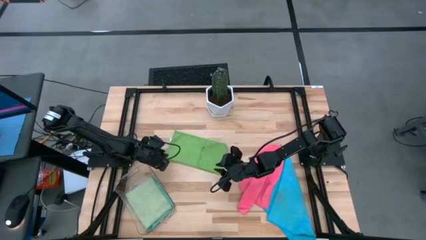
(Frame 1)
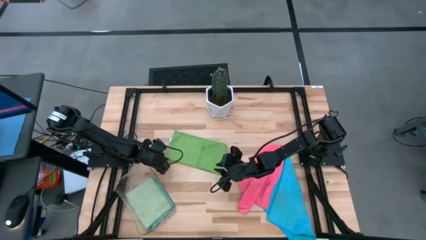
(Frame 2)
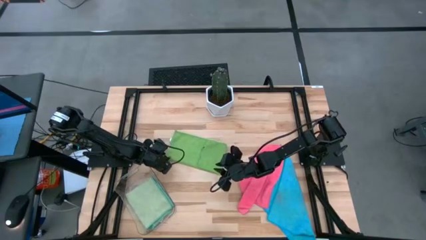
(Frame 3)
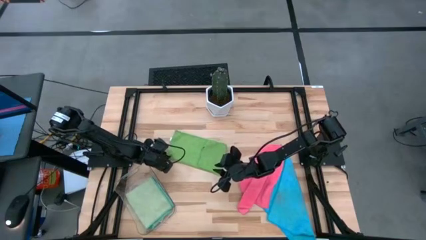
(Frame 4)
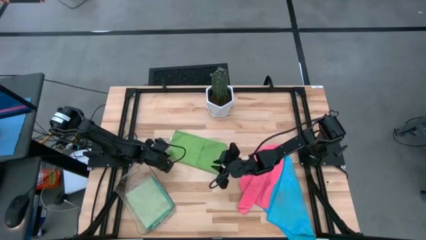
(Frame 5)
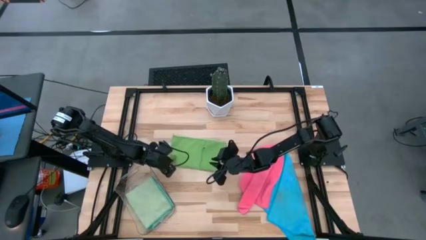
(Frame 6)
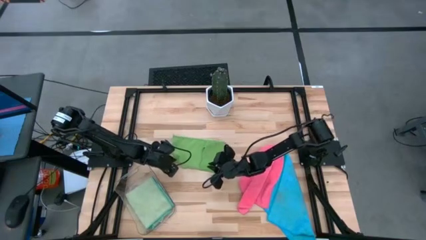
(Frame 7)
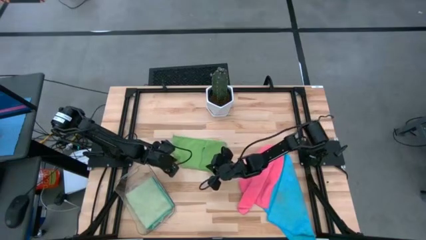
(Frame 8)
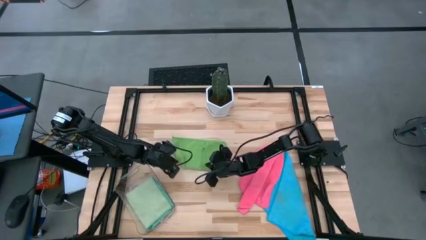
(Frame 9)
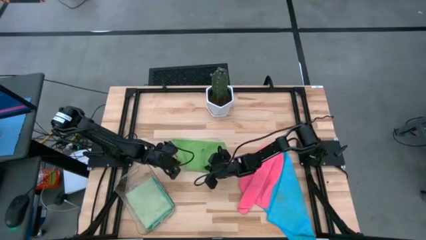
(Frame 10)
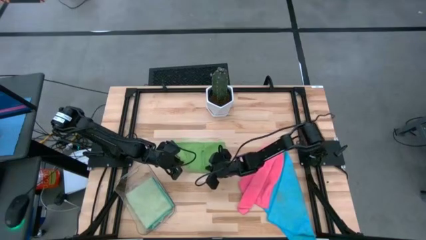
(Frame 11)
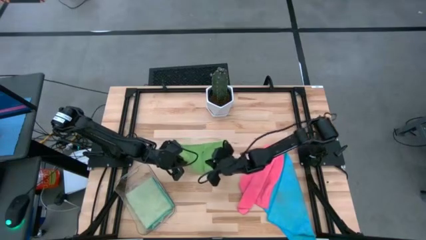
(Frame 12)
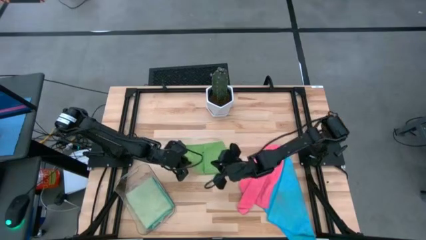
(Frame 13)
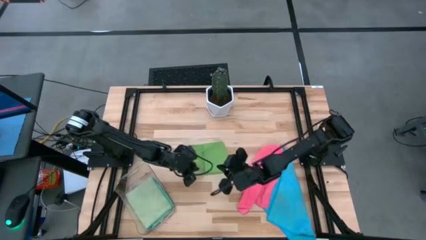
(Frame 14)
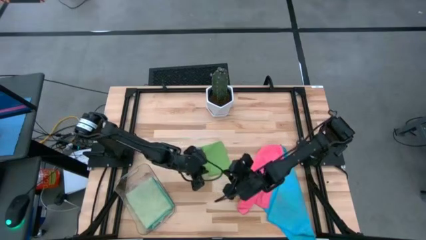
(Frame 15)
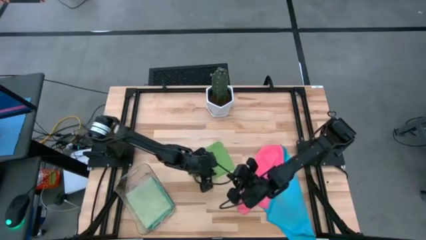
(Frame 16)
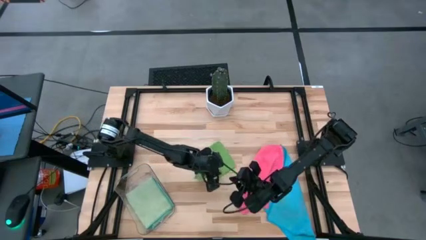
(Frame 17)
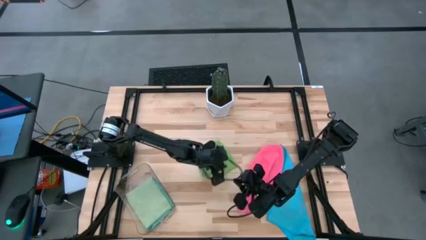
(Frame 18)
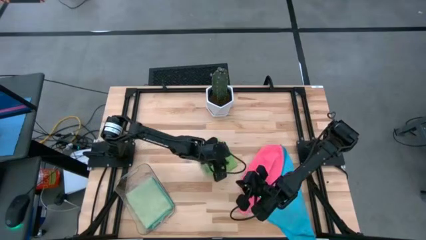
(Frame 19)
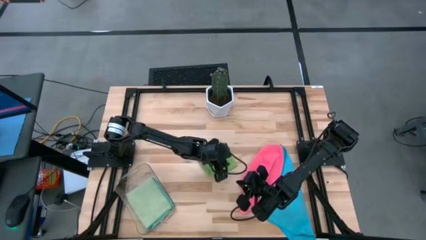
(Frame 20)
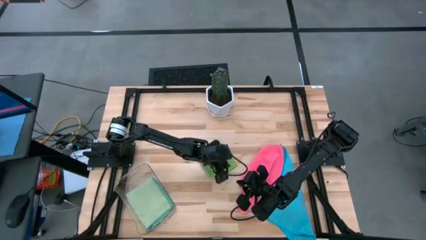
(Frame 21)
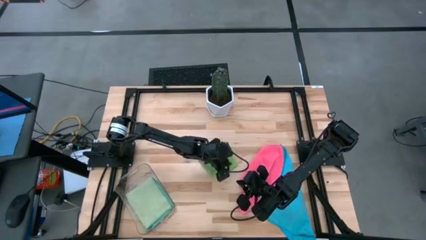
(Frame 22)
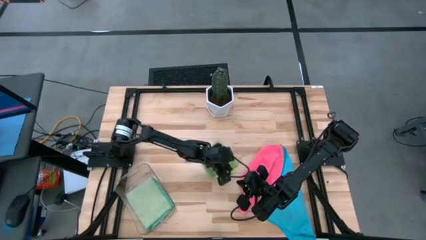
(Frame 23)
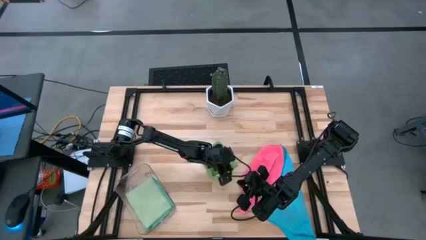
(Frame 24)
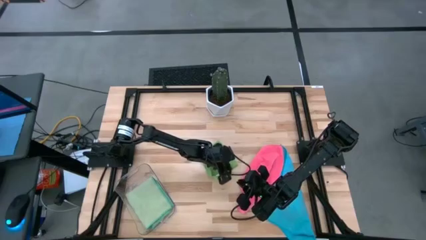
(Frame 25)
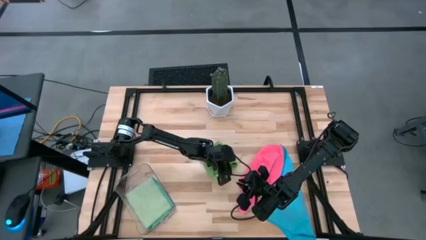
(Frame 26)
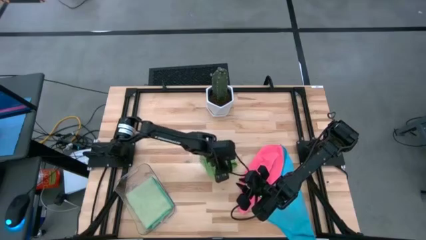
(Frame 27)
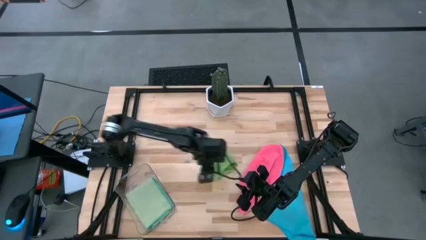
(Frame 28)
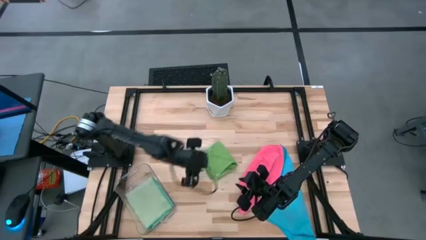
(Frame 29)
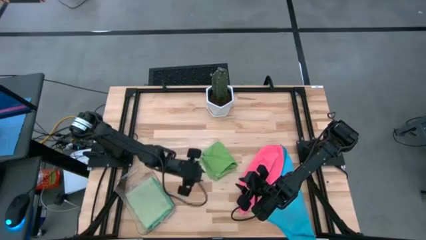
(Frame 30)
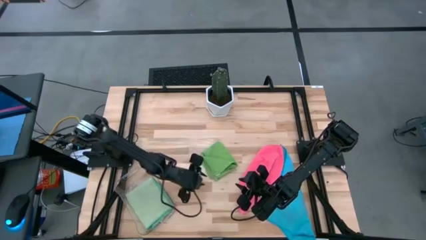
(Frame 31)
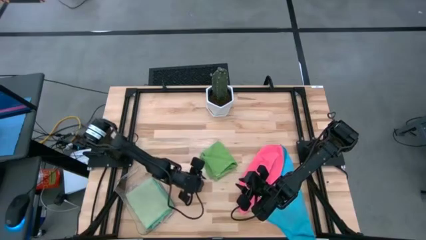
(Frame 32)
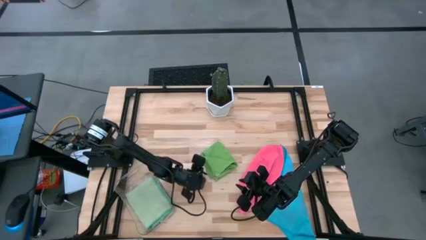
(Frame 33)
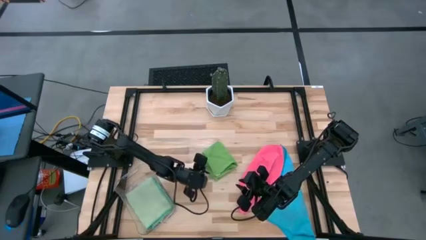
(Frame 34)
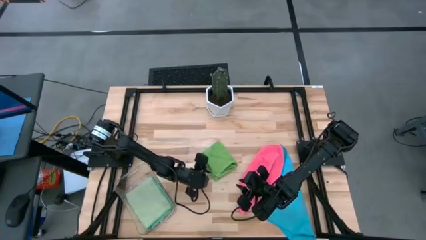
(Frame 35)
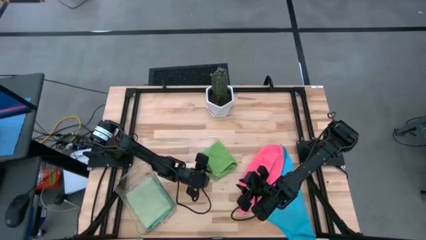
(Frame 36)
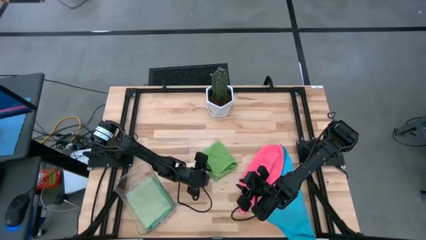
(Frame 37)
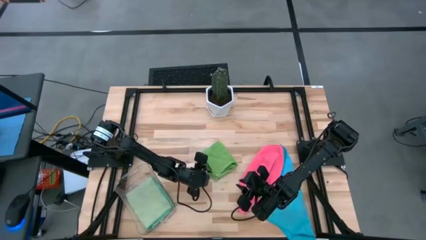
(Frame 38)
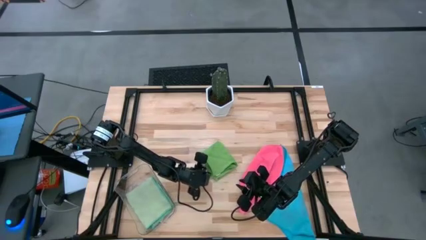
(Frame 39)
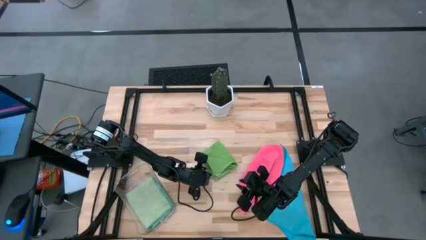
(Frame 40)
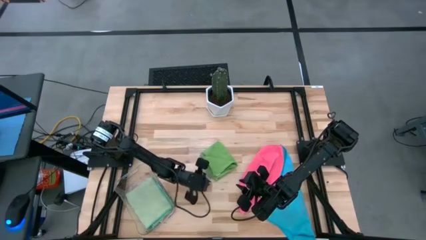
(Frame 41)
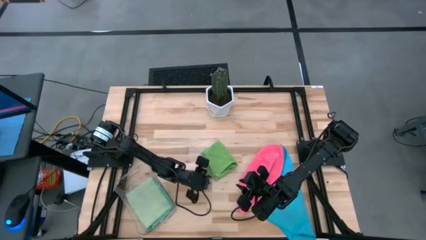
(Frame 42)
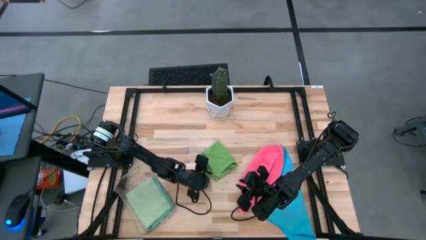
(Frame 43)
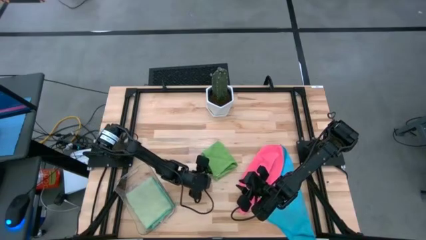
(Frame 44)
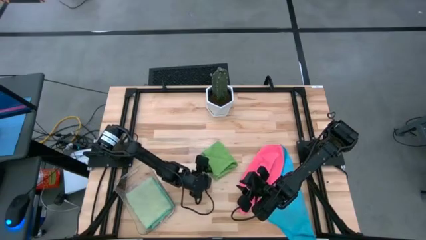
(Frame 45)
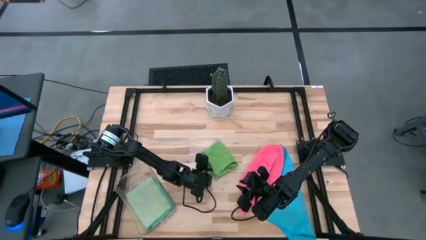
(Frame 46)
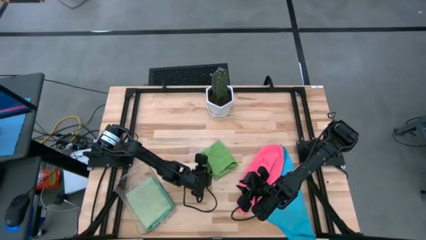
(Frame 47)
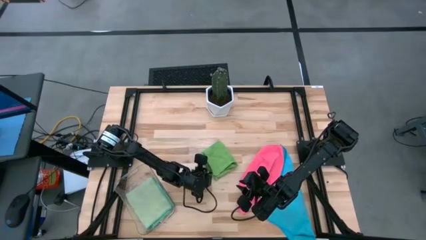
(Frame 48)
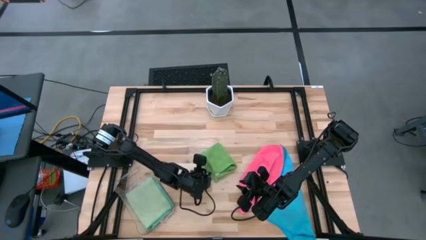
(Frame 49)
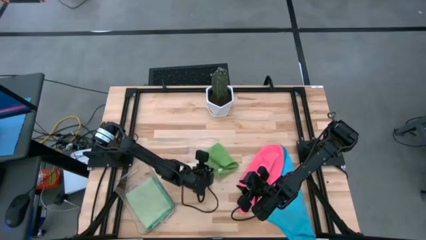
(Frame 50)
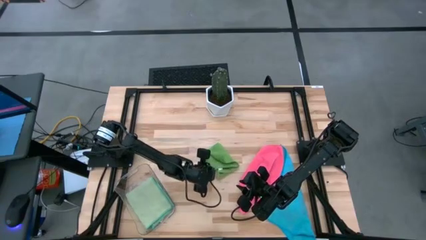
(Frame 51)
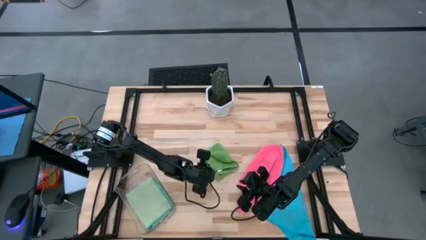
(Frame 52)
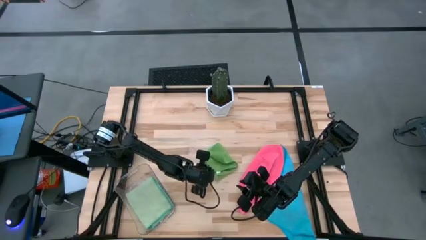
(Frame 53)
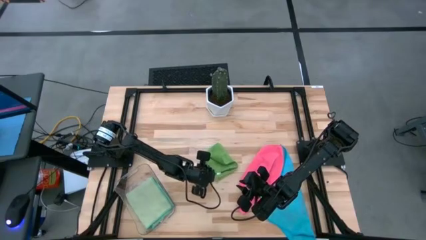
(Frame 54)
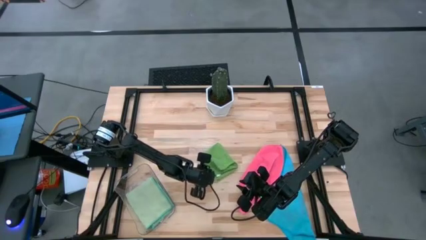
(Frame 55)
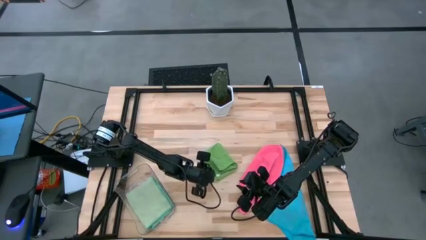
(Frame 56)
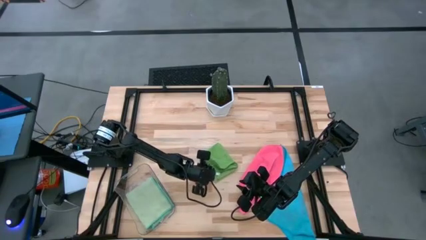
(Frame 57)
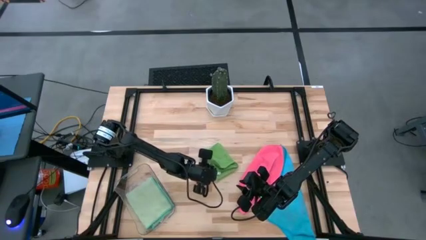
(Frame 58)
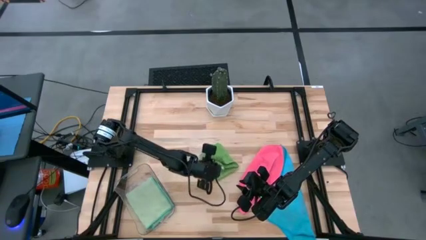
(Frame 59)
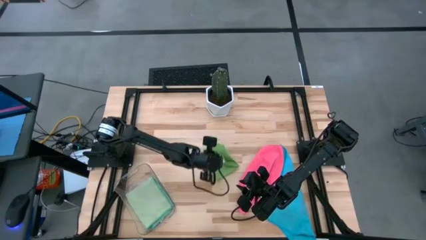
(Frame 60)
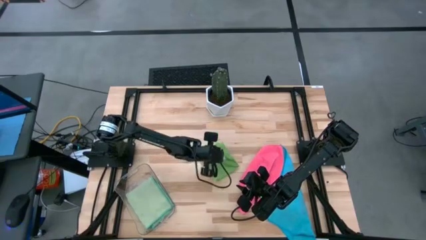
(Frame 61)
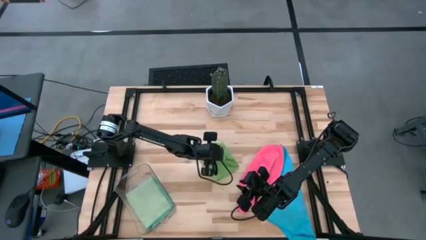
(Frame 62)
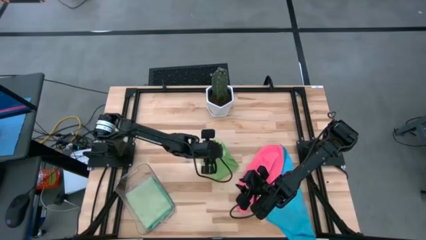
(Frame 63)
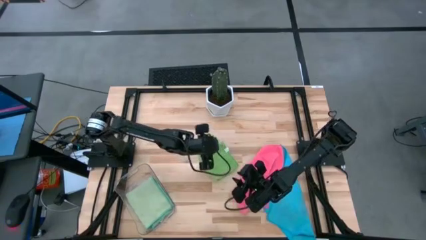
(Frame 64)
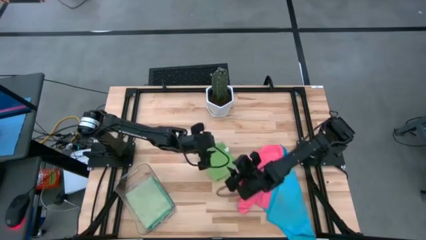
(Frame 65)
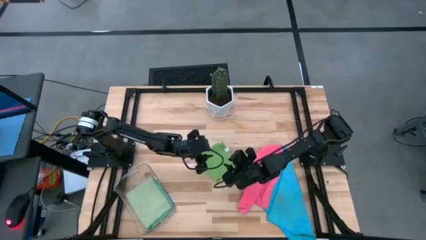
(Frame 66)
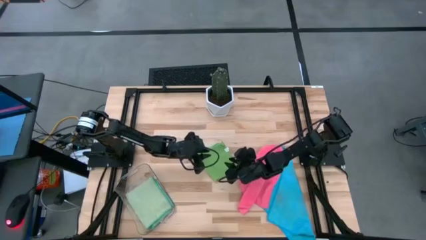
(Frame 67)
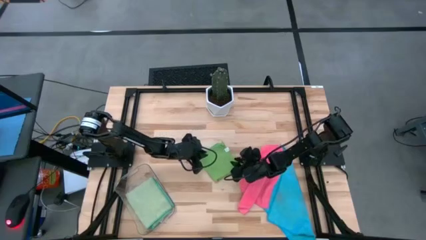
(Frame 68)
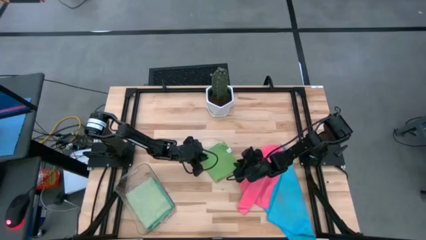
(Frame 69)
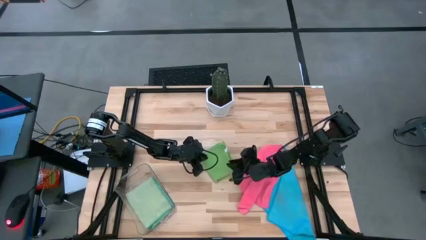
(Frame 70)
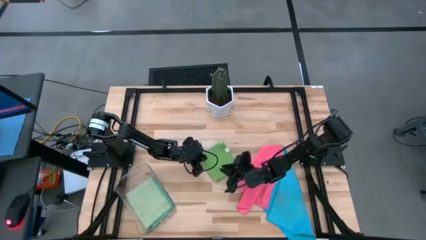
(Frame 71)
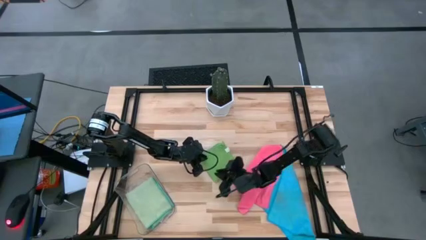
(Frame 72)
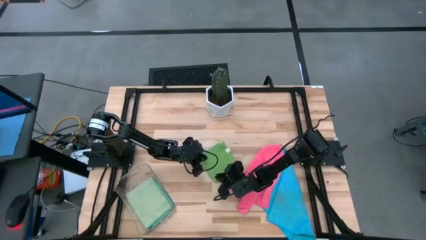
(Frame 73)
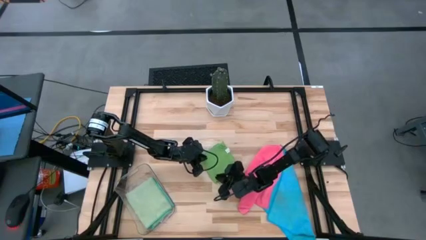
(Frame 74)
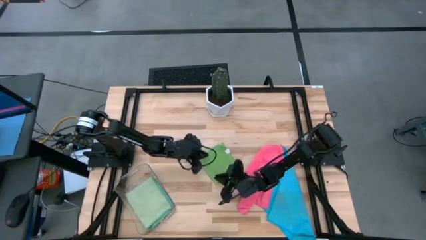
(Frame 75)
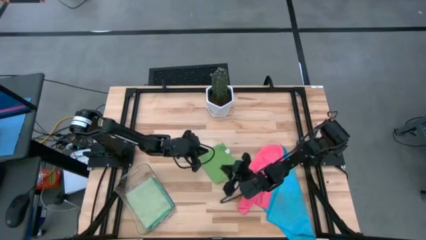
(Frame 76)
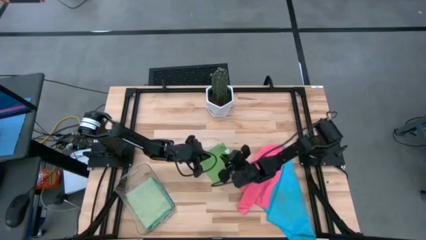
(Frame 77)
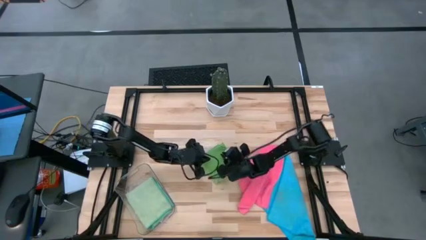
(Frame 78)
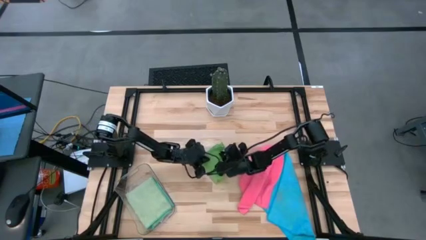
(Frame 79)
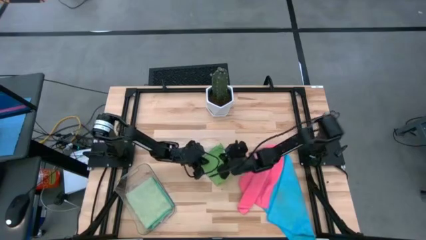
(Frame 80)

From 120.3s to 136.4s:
Task: Fold microfiber towels
Fold the green microfiber cloth

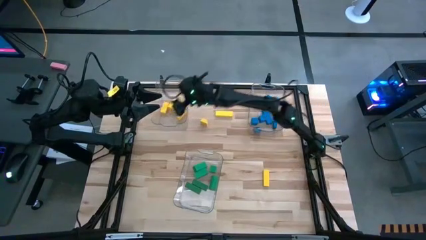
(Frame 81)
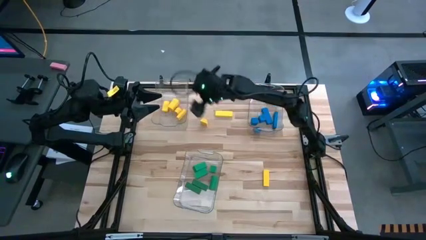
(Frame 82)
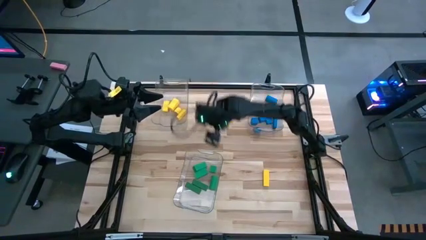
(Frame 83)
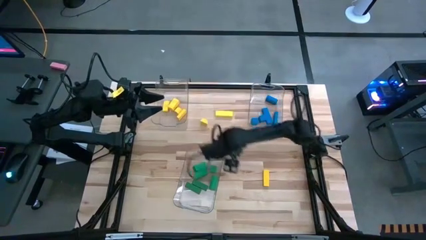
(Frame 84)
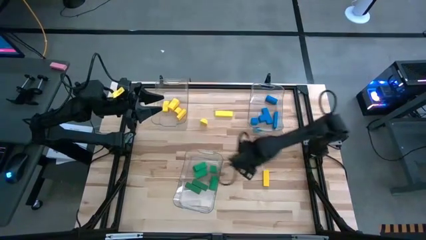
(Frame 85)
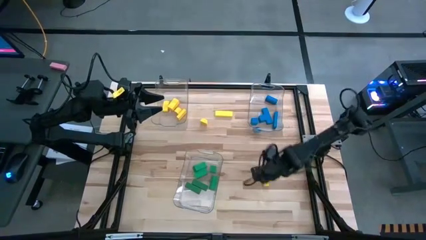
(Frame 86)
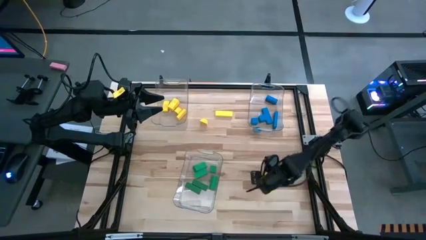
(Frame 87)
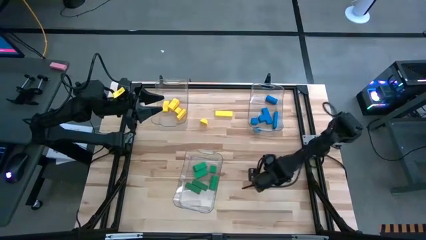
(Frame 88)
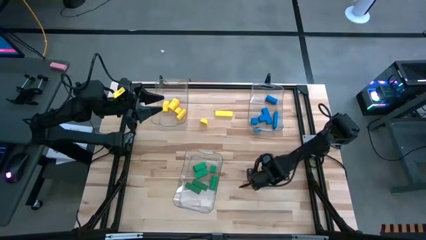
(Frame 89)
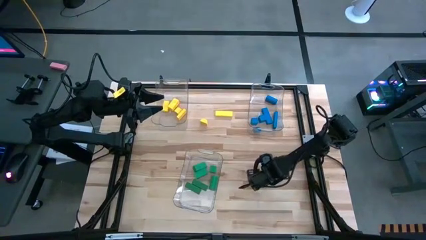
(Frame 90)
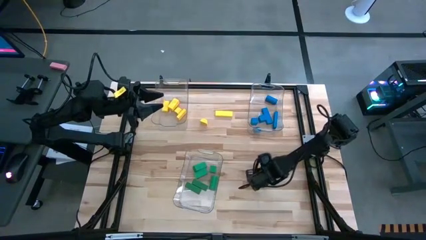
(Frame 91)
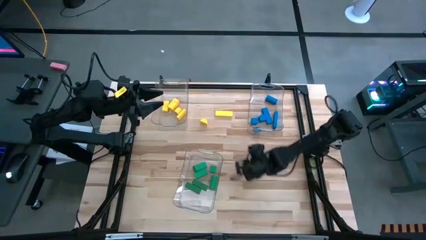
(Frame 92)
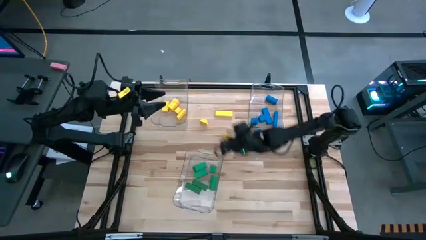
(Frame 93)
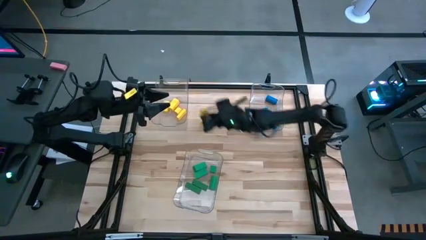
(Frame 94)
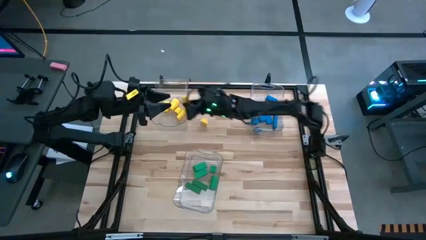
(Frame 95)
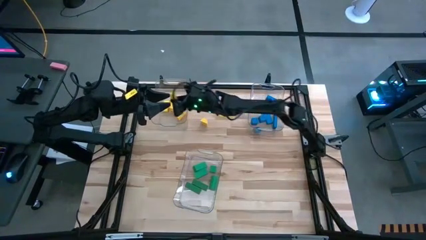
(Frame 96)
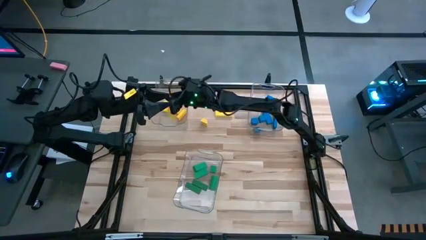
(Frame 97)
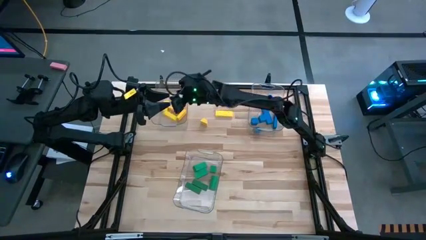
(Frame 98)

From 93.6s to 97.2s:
Task: Sort blocks
Put the yellow block into the top left transparent bin
